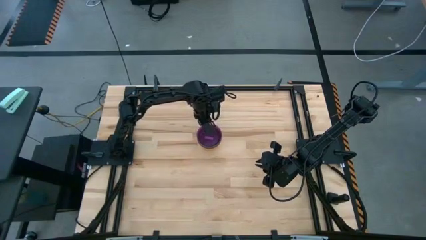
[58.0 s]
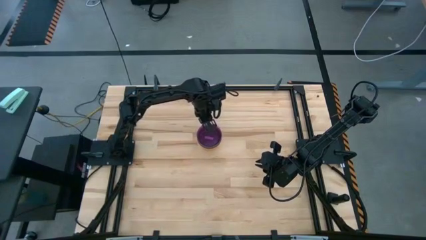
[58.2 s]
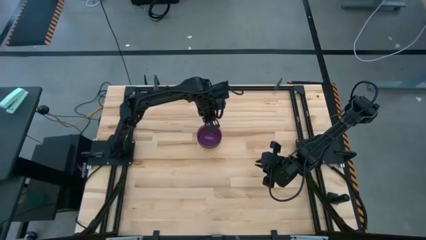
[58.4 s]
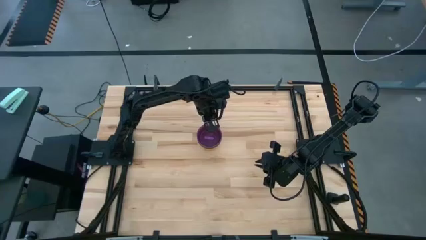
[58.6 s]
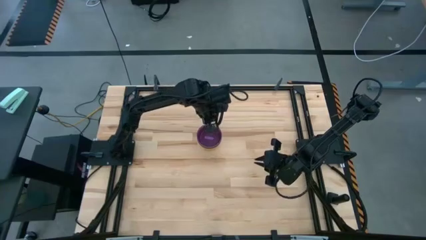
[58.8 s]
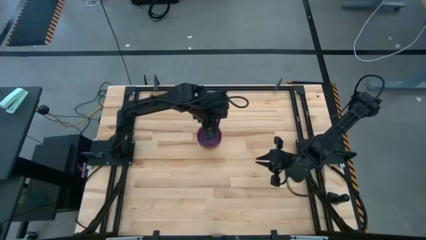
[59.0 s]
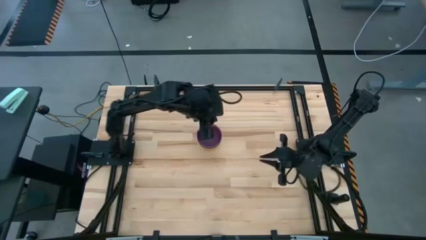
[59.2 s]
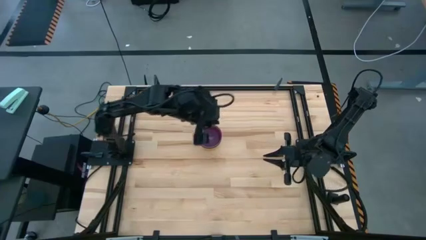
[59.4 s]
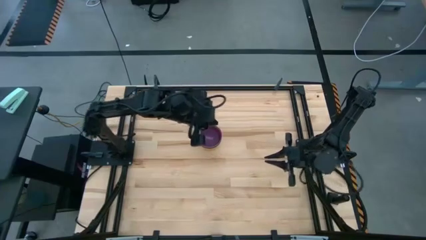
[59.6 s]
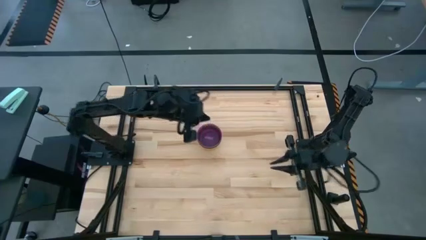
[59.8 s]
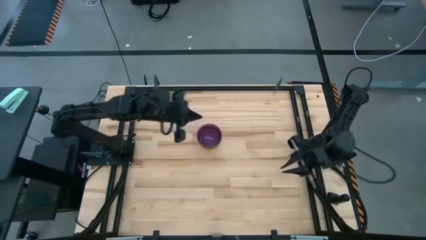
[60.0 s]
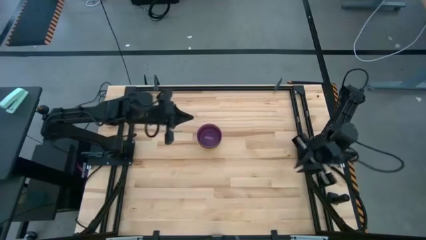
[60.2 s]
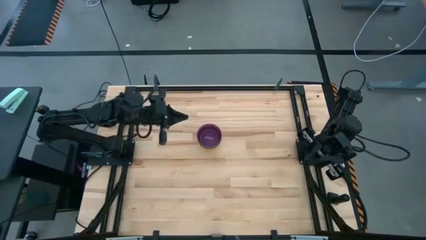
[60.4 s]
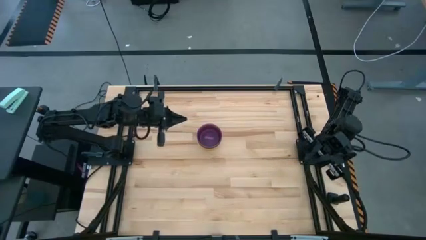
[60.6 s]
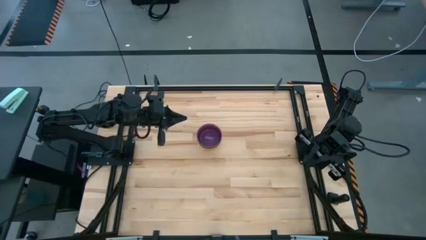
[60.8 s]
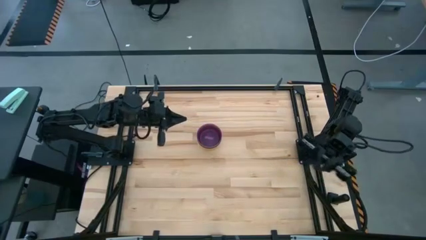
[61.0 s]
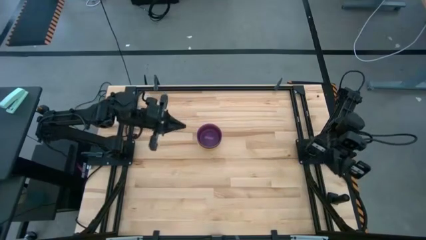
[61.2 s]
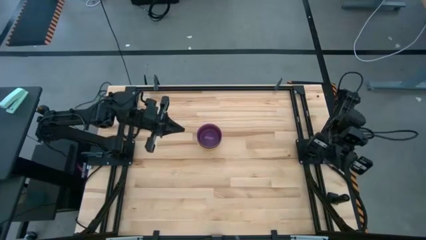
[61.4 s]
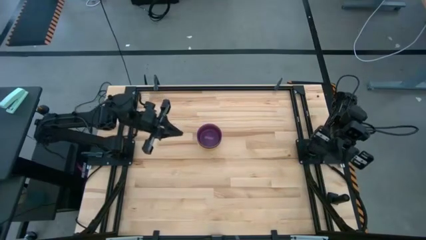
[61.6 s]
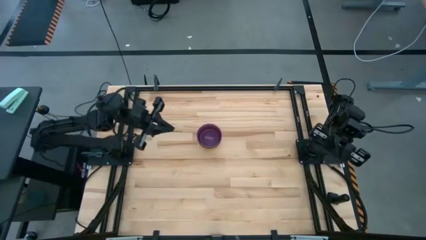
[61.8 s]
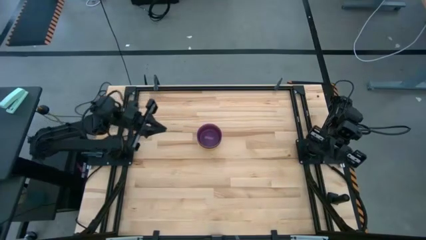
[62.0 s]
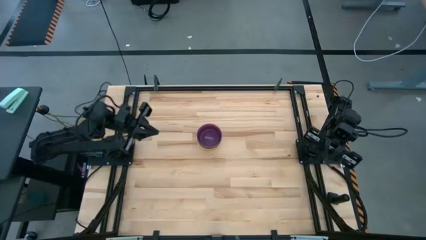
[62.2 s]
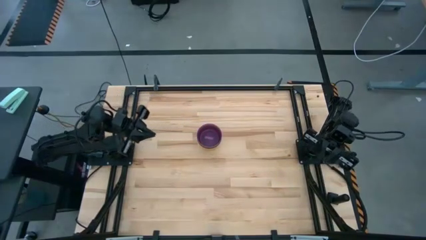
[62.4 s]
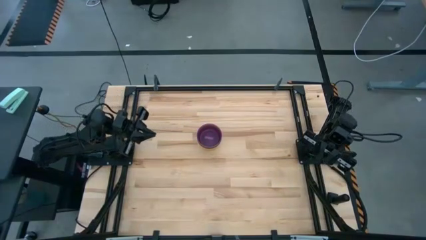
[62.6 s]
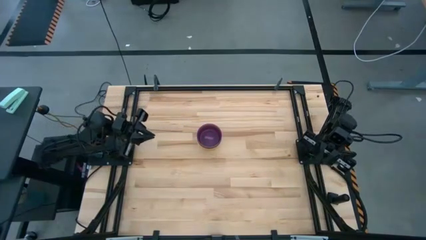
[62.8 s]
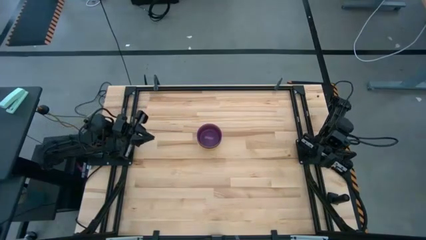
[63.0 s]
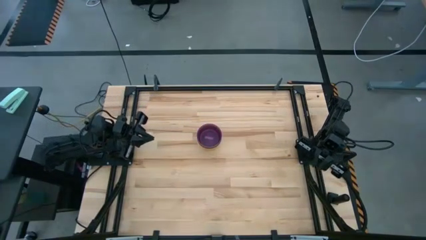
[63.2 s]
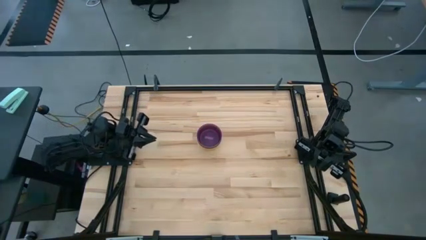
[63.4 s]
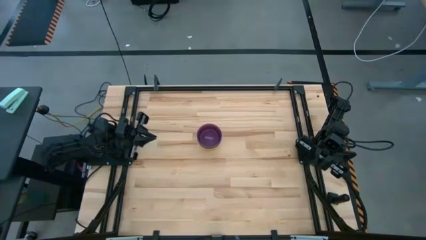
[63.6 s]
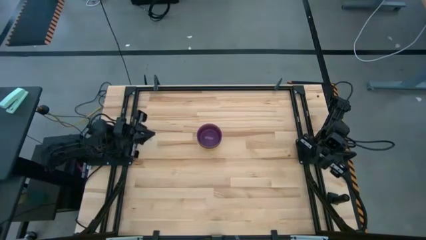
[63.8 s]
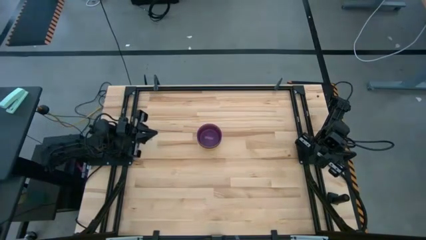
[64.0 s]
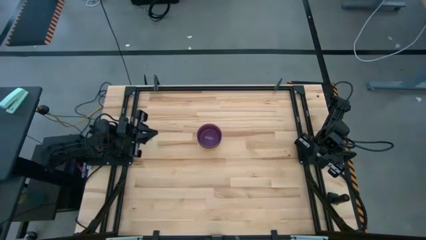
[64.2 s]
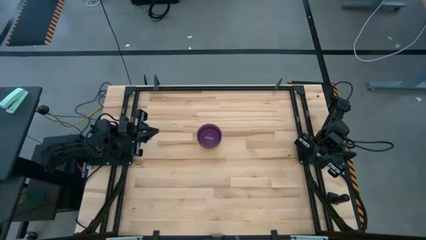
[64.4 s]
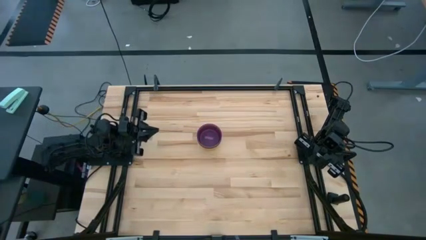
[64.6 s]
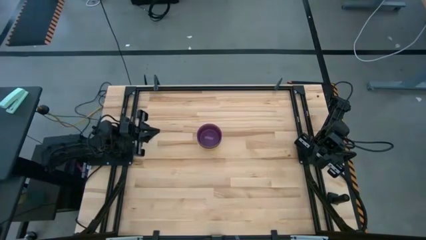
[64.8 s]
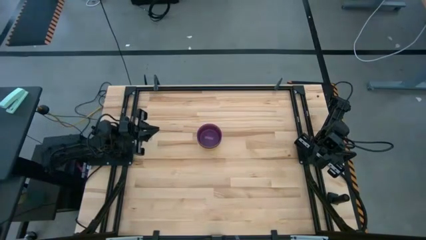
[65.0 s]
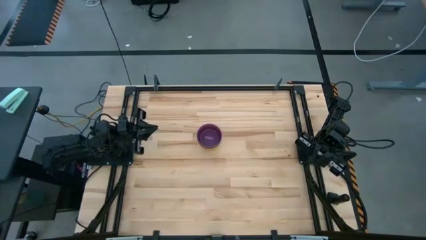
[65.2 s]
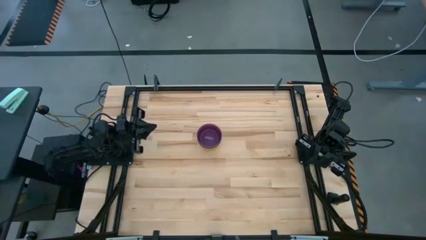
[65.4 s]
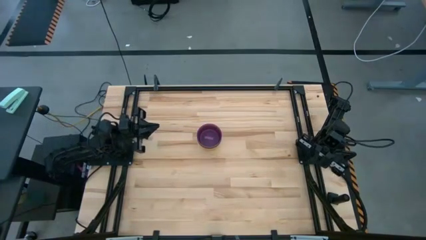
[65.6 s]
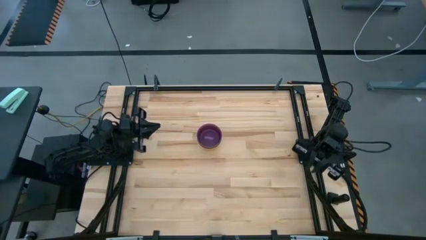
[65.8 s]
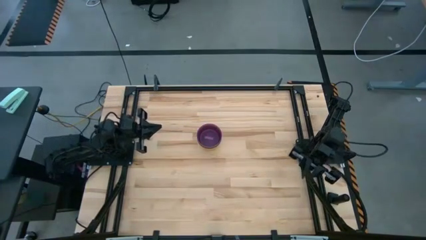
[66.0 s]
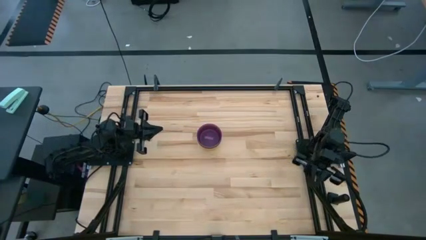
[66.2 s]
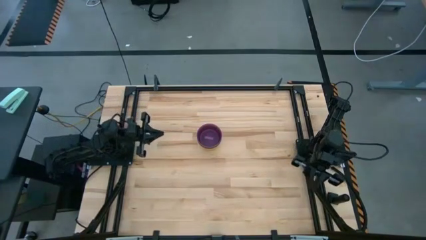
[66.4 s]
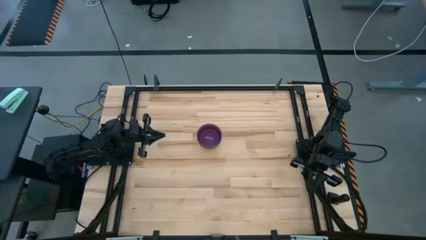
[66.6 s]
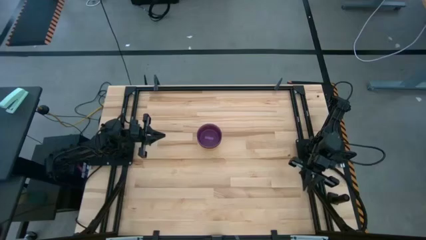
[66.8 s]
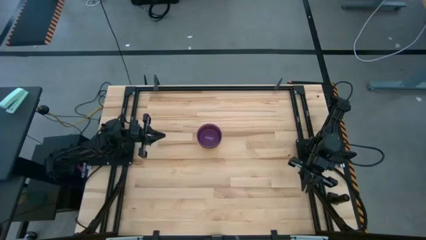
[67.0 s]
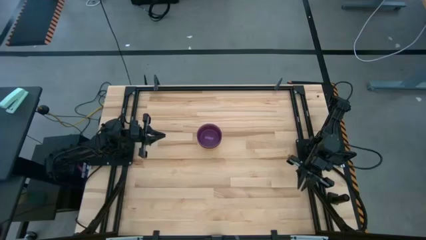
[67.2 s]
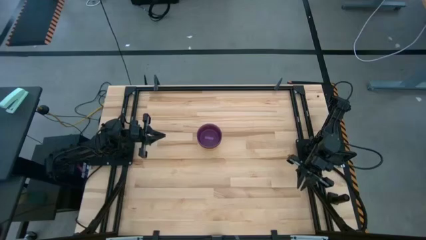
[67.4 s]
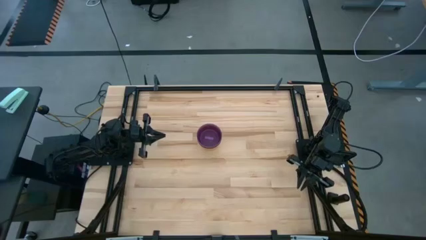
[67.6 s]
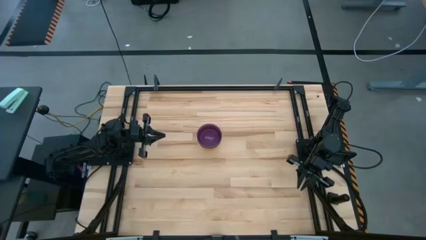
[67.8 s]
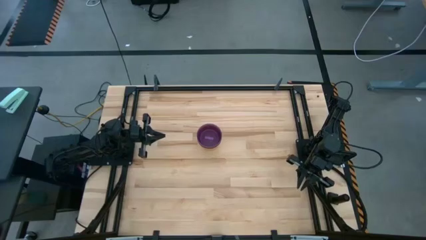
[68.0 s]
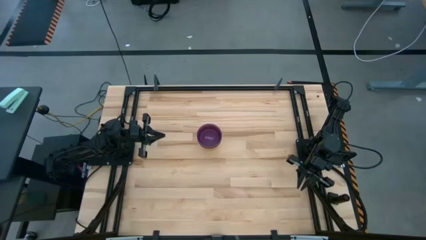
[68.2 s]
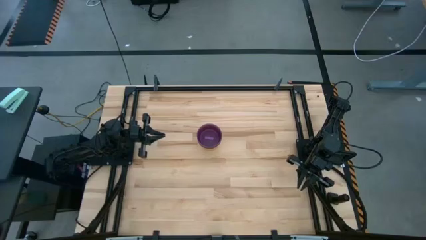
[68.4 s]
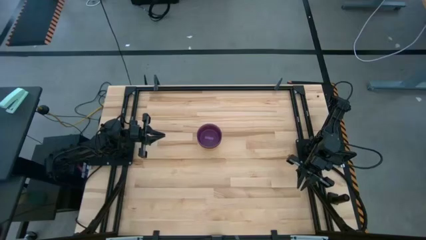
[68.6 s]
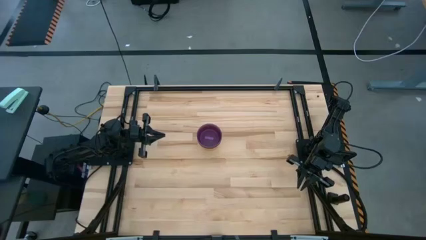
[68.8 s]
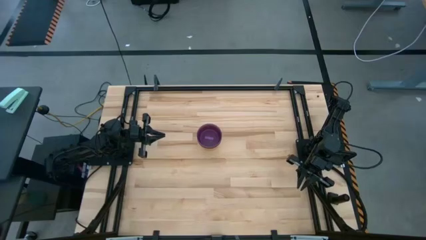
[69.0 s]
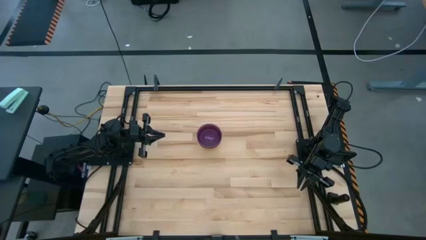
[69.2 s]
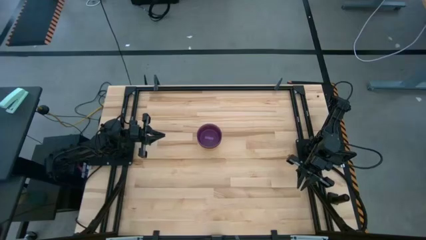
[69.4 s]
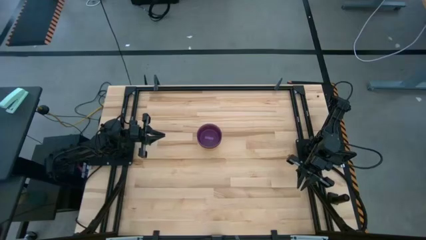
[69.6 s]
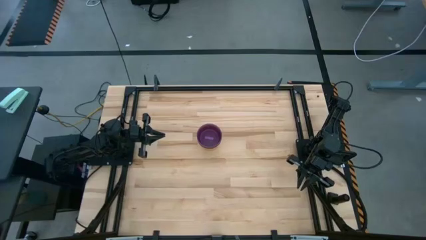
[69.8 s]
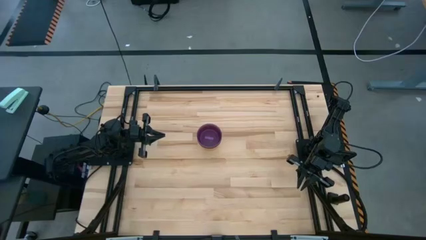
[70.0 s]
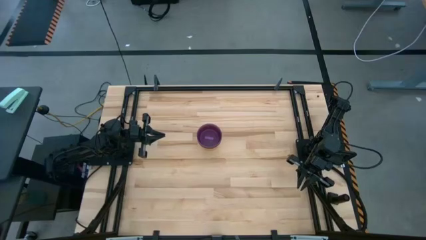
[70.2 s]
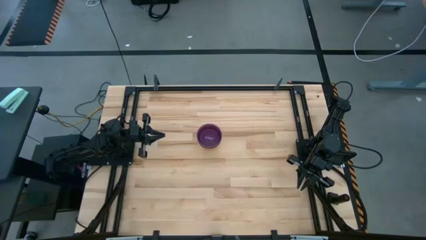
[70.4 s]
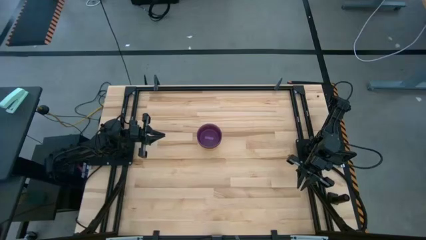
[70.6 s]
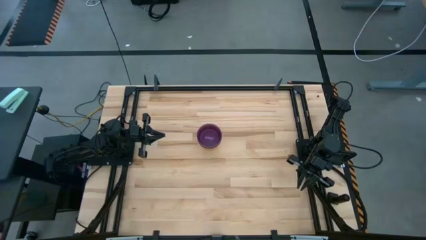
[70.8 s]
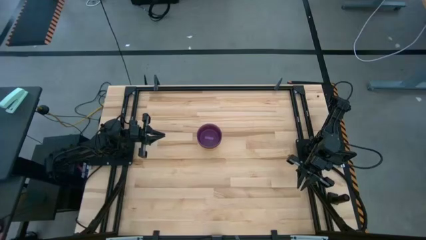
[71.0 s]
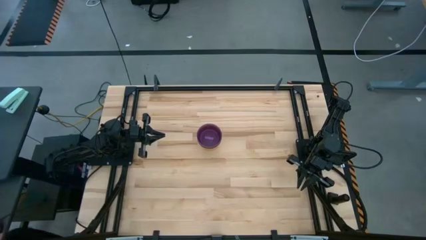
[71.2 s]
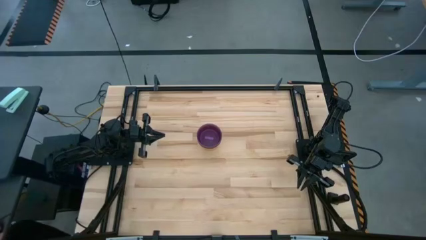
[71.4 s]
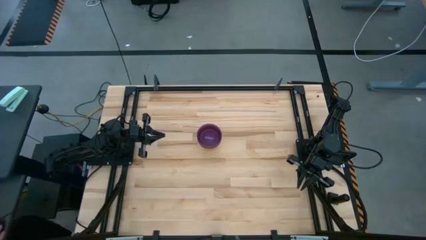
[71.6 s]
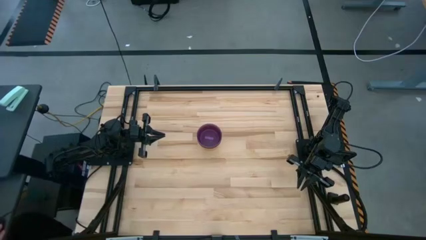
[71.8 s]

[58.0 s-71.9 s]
Task: Nest bowls inside each other
Return To Home Position
